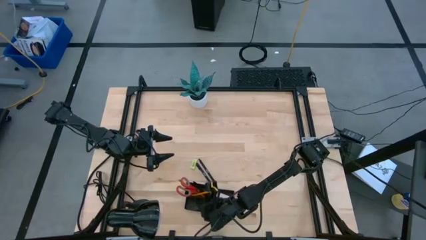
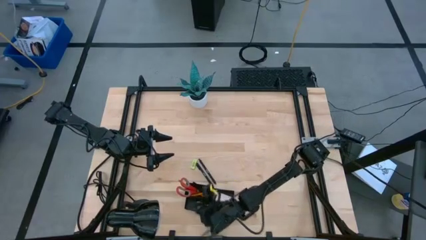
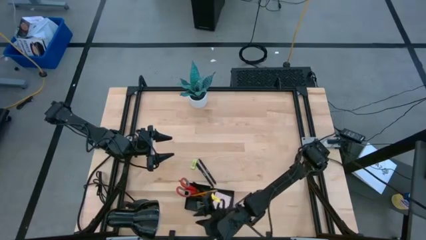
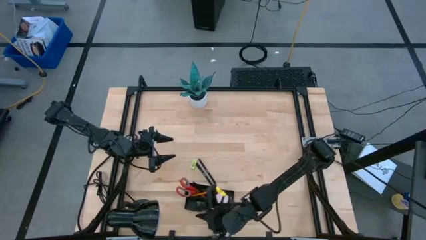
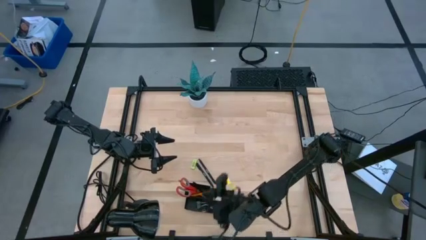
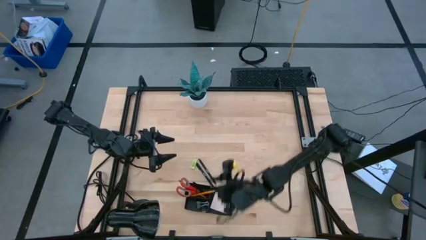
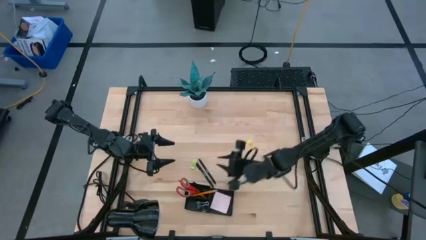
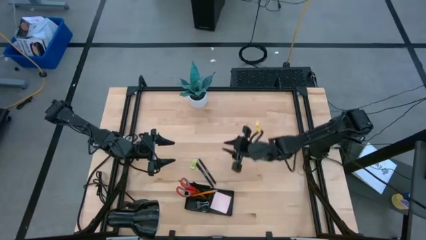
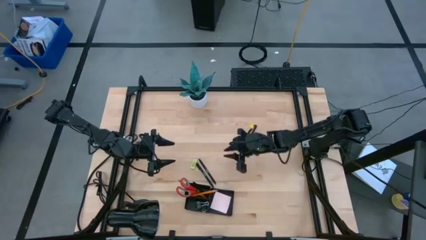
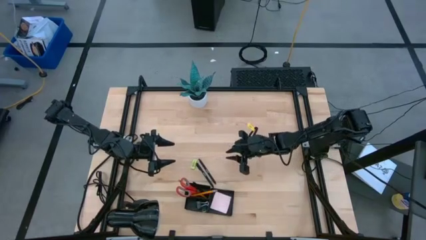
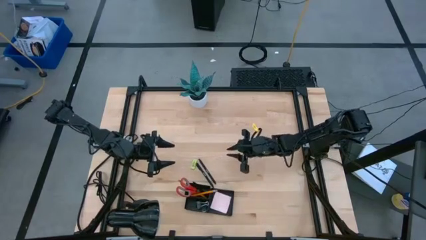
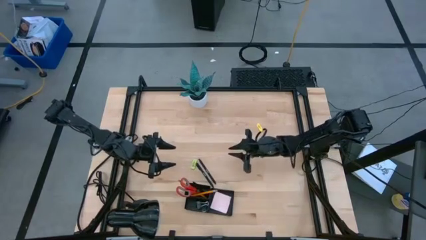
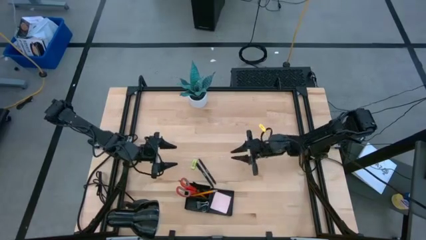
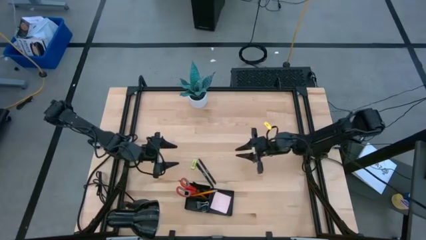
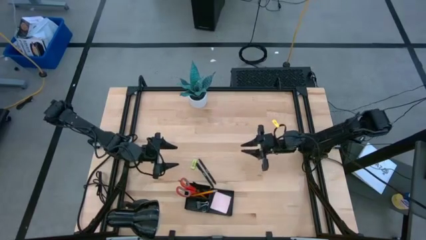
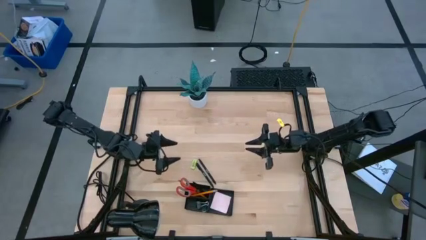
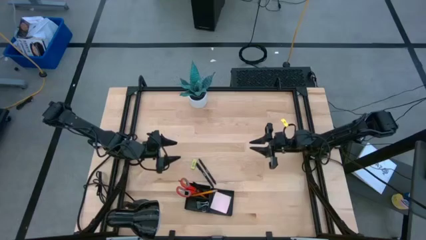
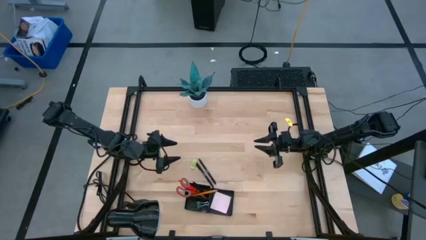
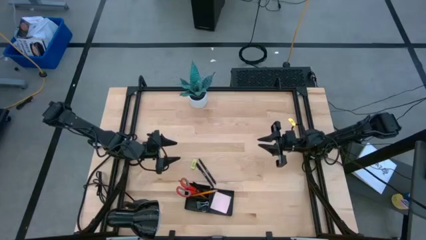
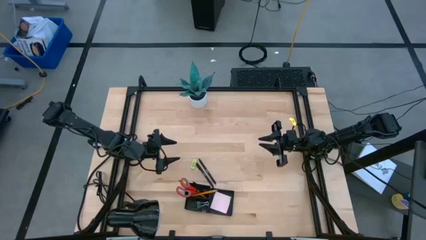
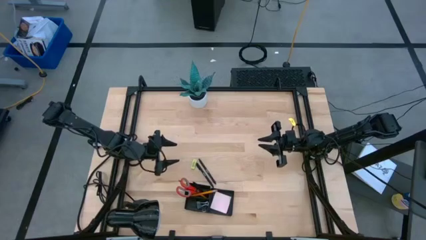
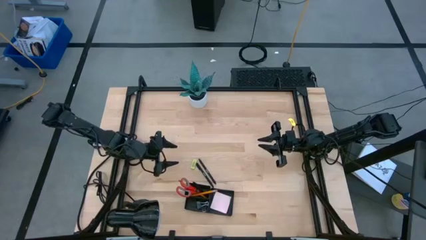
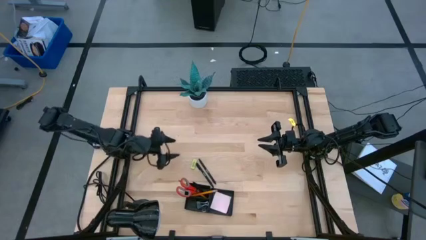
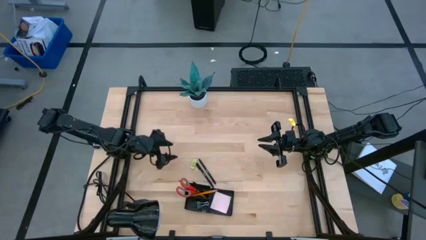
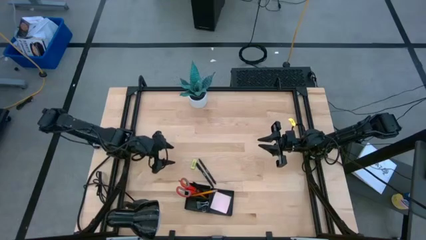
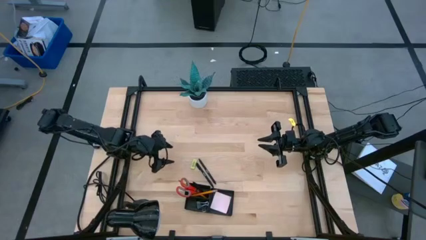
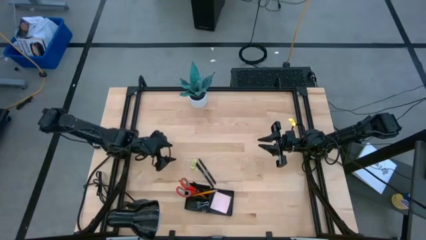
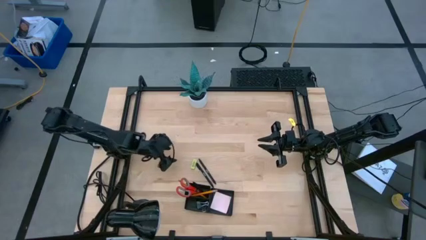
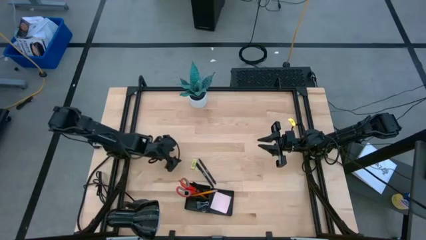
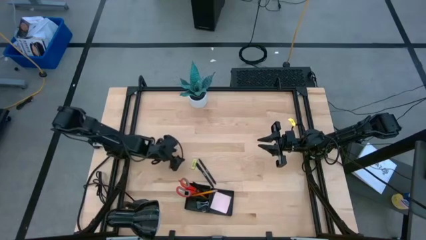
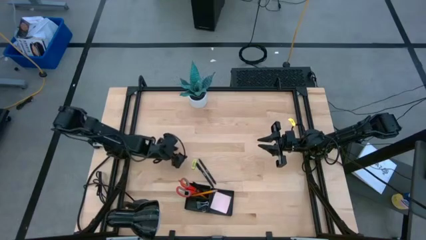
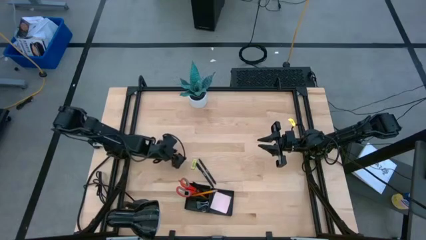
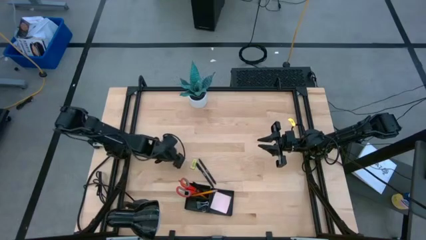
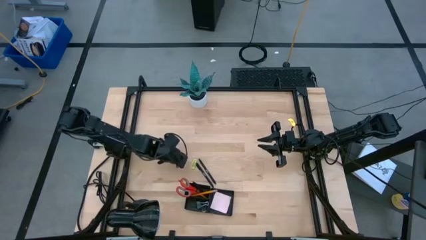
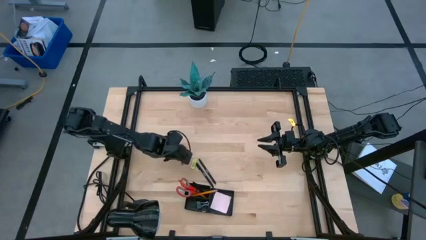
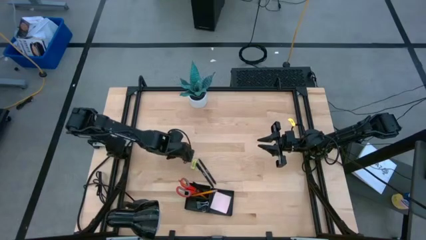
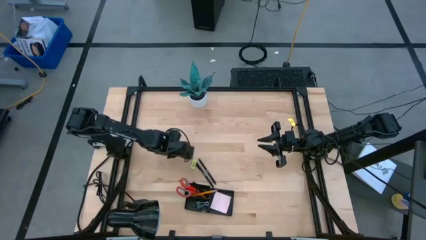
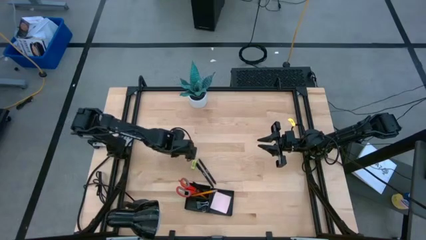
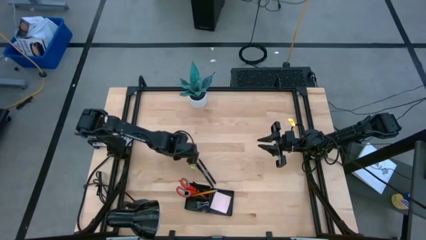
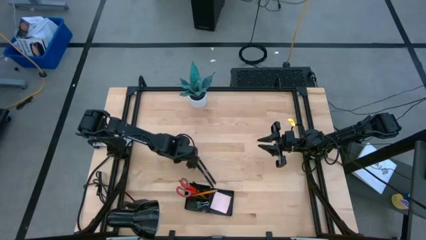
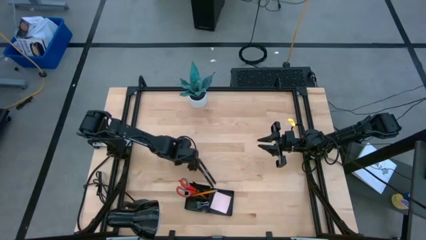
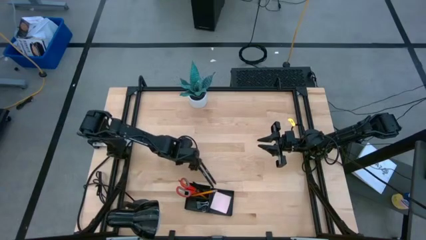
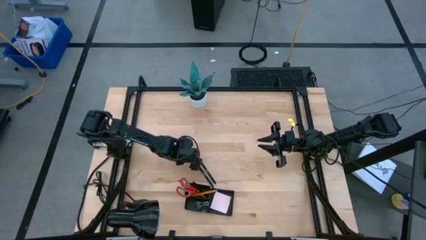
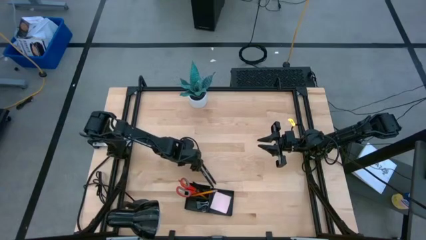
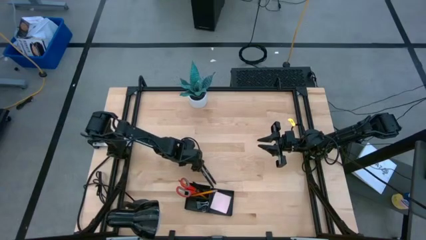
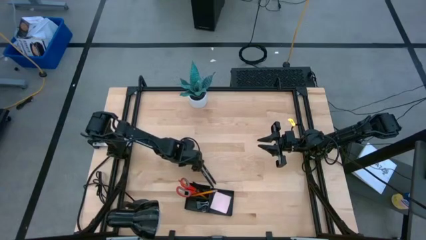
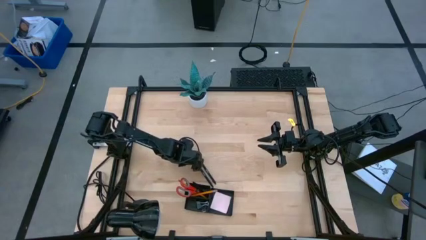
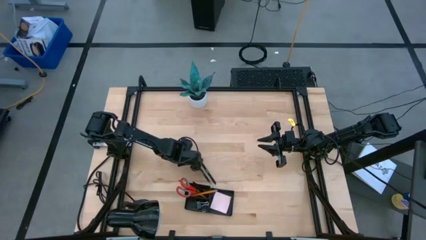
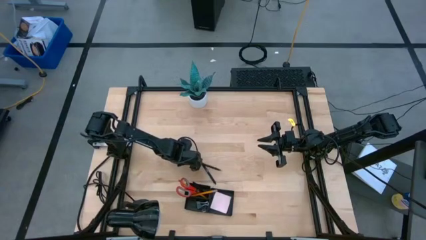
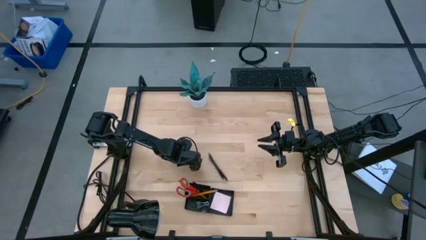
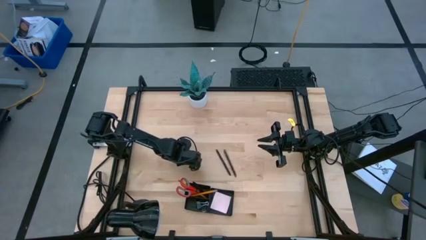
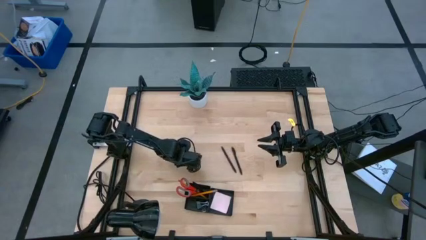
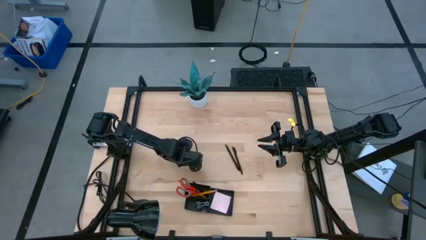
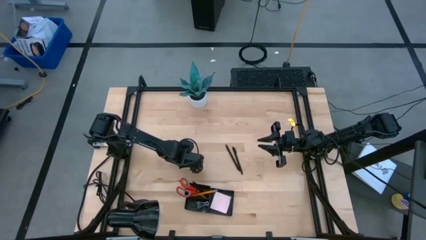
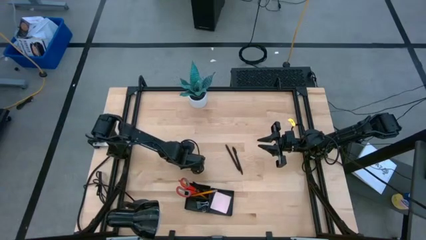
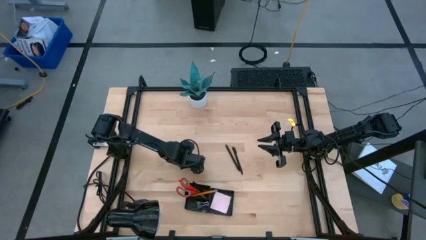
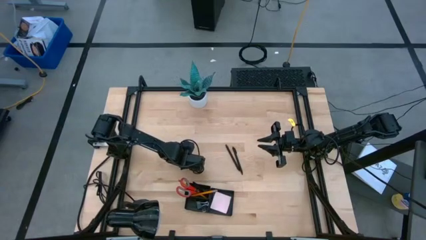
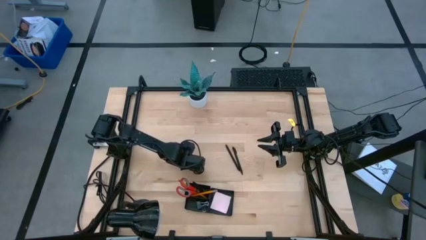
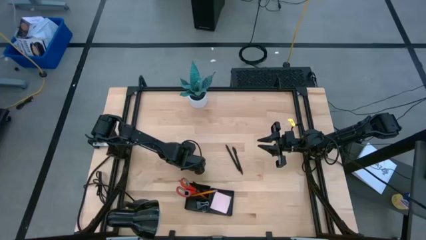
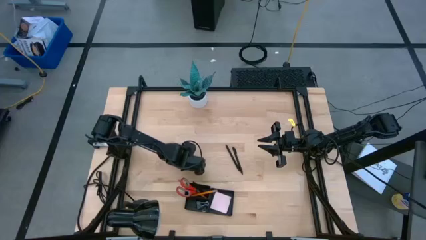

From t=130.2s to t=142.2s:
Task: Pick and place office supplies into organizer
Put the light green eraser into the black desk organizer

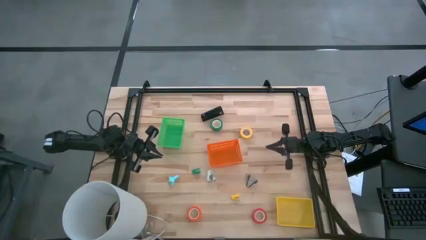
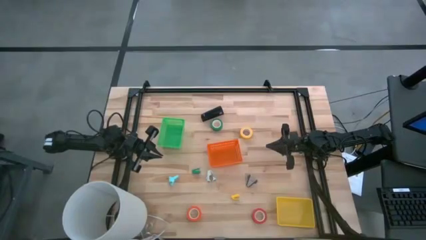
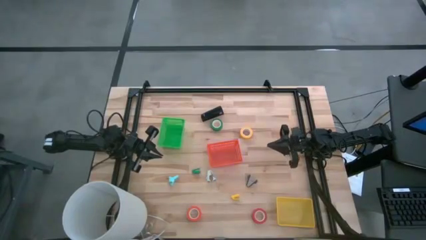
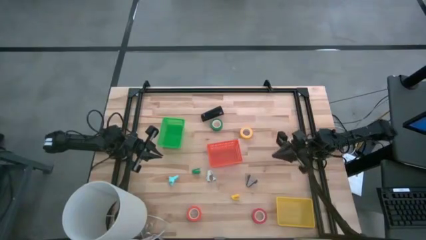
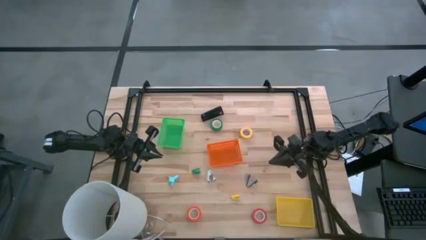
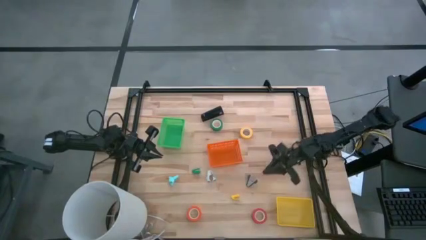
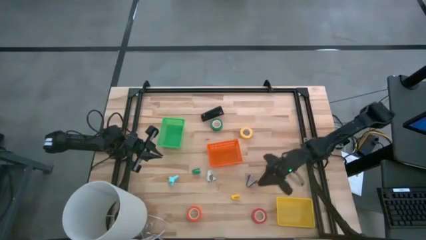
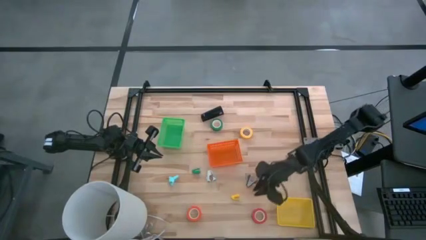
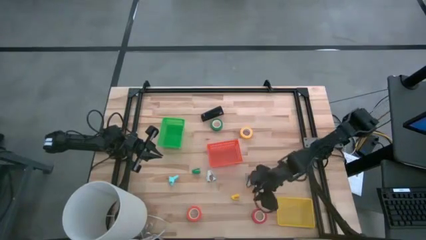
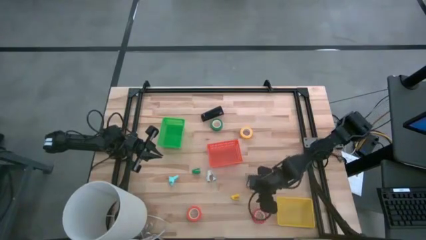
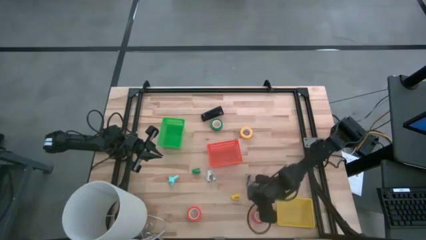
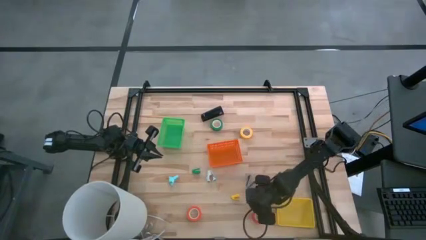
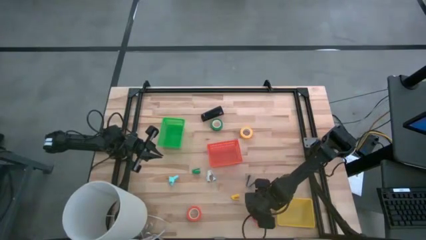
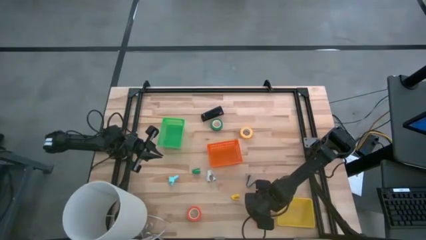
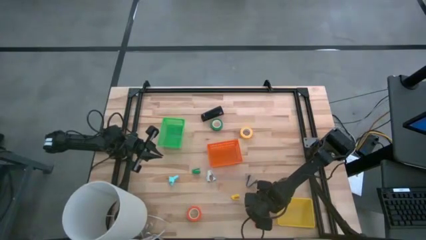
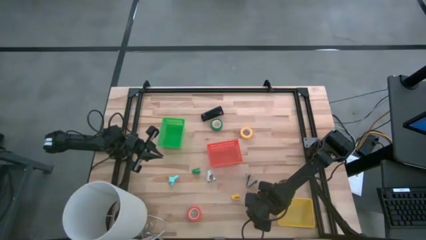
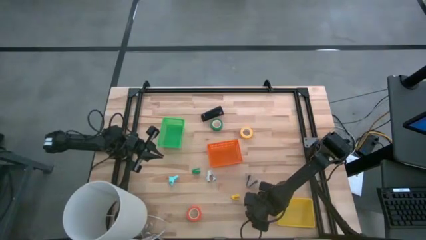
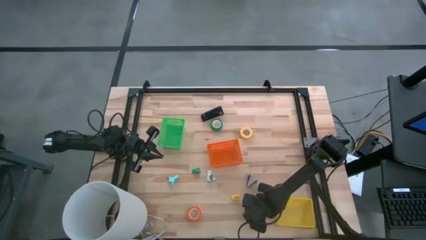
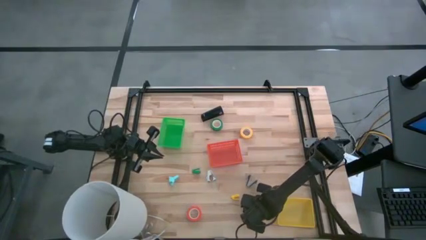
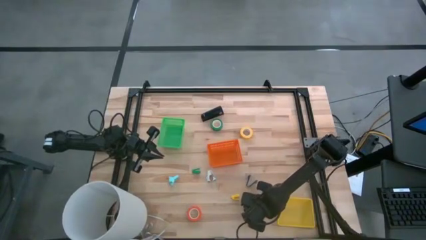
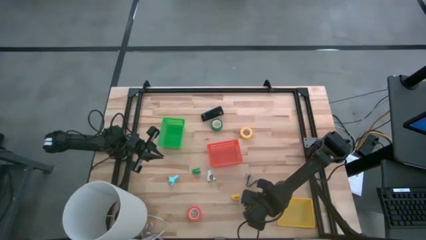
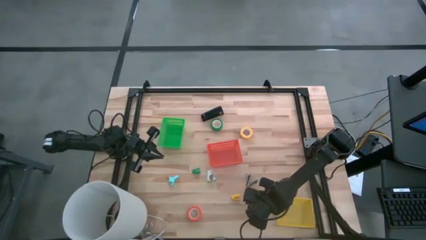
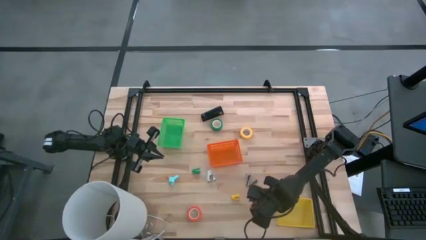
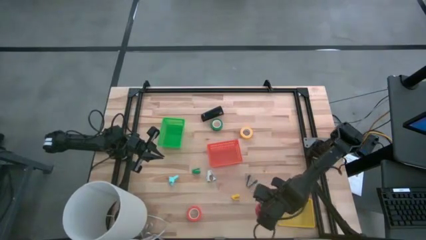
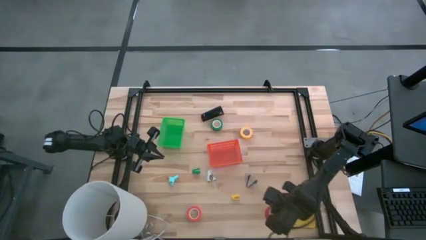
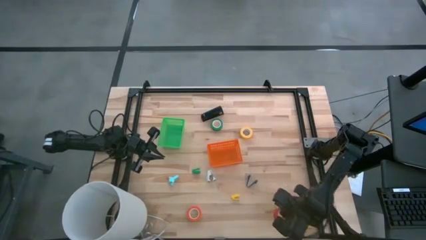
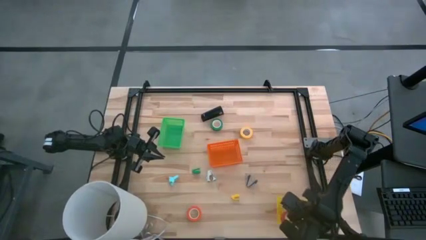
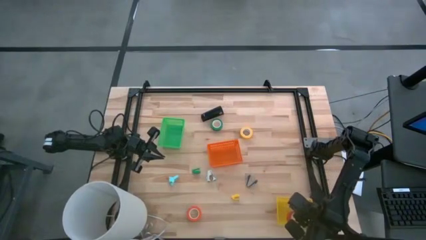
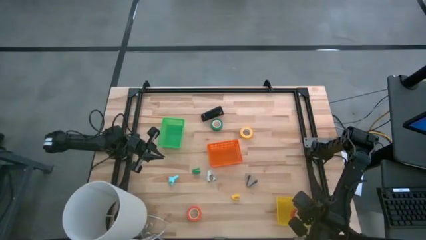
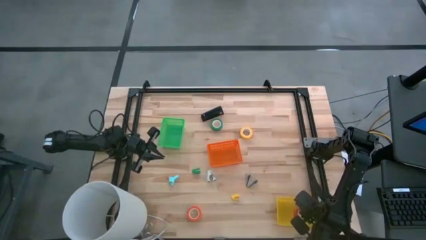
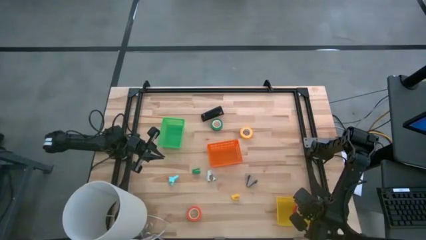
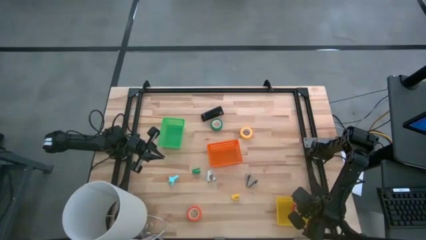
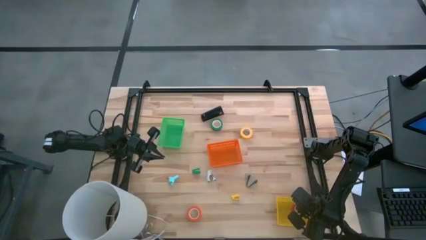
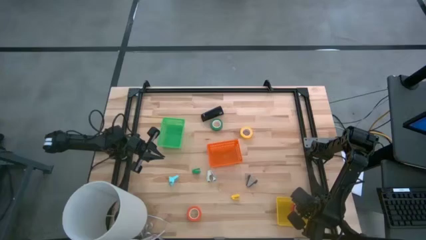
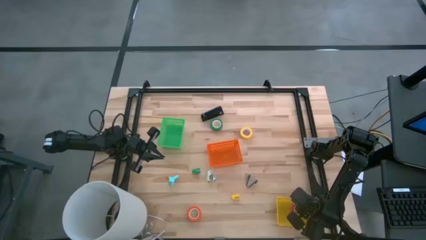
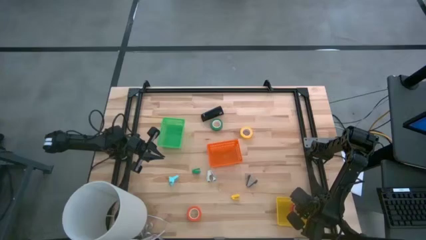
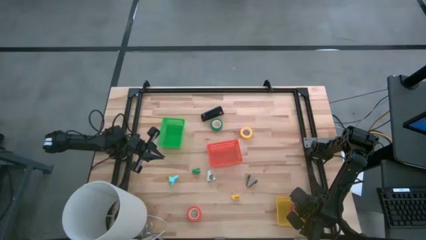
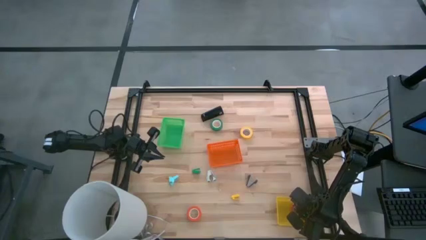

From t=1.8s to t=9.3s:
Task: Pick and place Stapler, Stapler remover, tape
Put the red tape into the yellow bin
